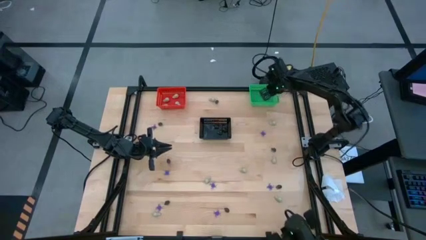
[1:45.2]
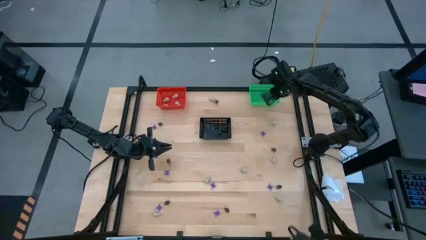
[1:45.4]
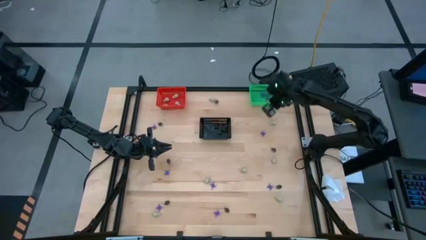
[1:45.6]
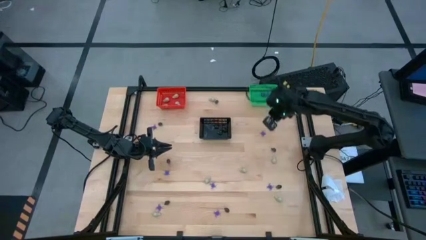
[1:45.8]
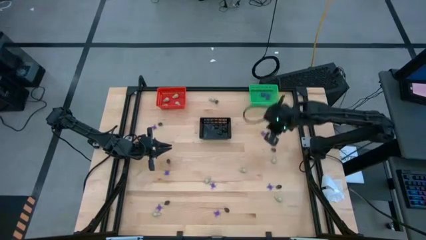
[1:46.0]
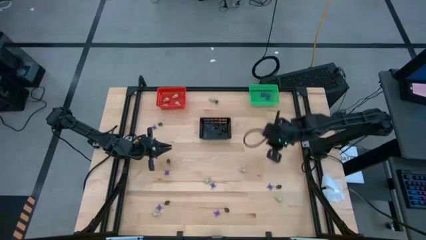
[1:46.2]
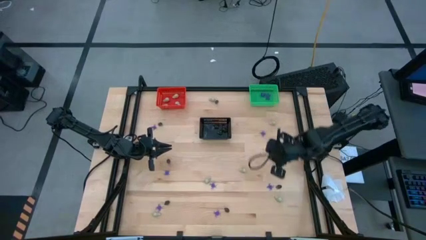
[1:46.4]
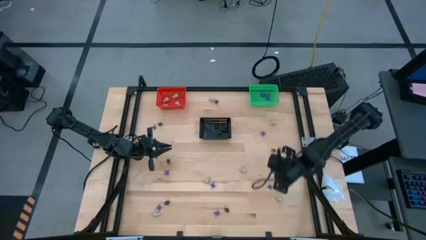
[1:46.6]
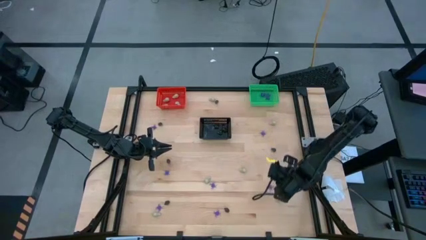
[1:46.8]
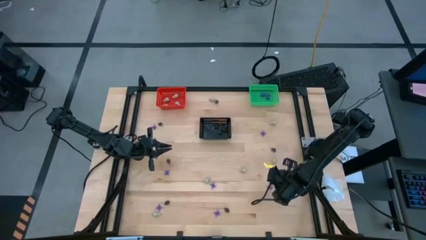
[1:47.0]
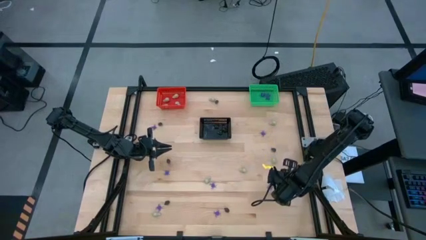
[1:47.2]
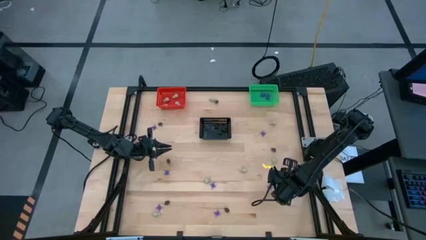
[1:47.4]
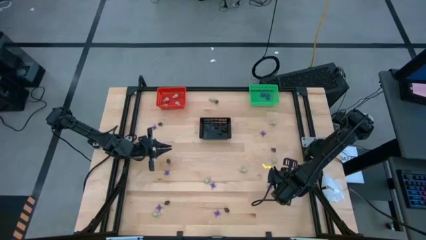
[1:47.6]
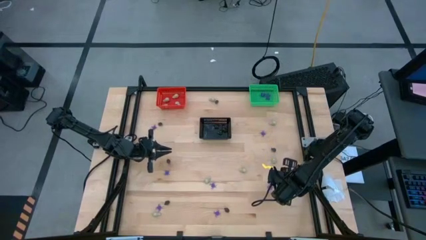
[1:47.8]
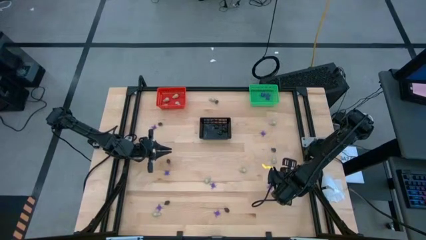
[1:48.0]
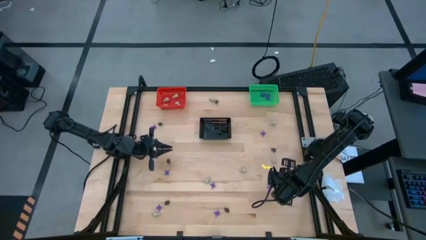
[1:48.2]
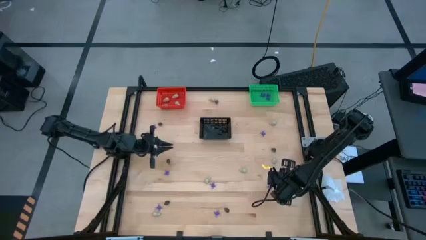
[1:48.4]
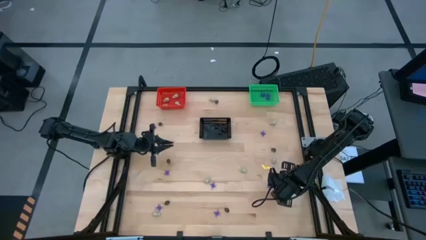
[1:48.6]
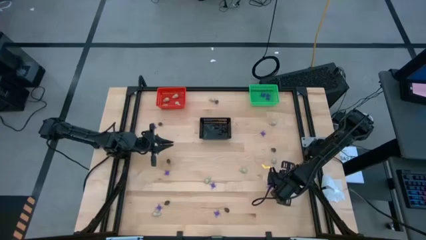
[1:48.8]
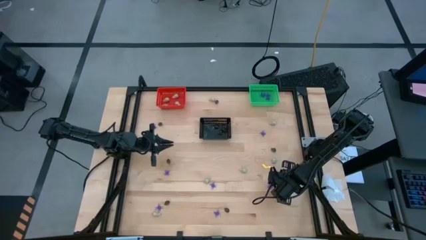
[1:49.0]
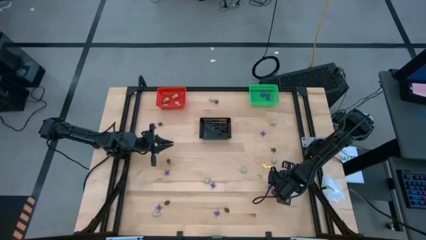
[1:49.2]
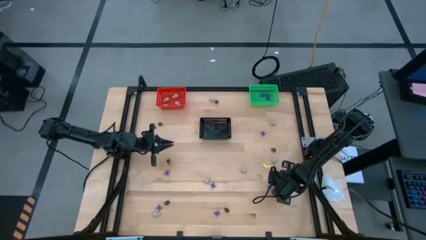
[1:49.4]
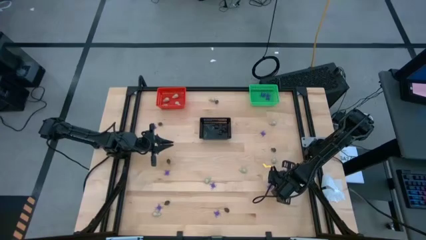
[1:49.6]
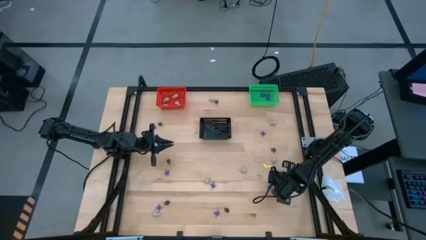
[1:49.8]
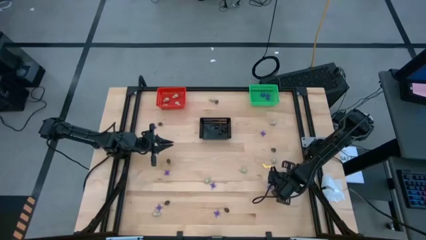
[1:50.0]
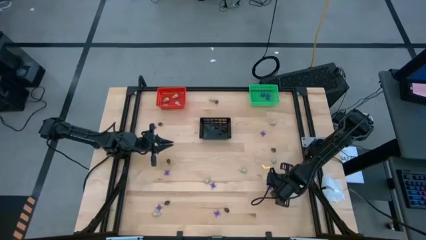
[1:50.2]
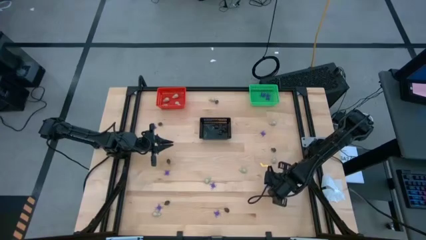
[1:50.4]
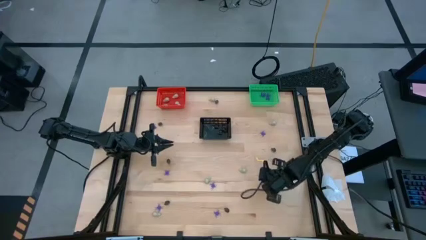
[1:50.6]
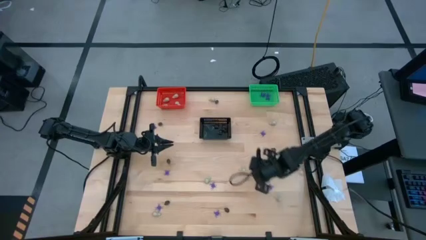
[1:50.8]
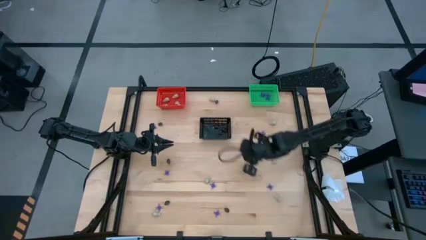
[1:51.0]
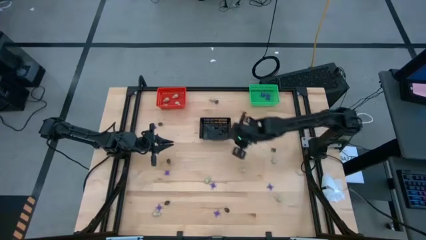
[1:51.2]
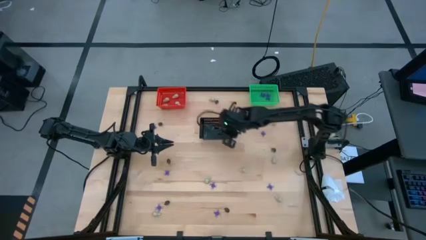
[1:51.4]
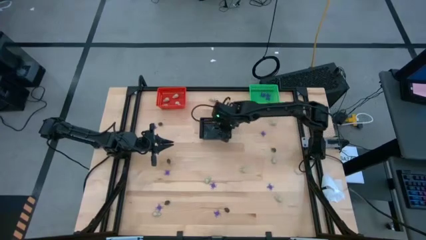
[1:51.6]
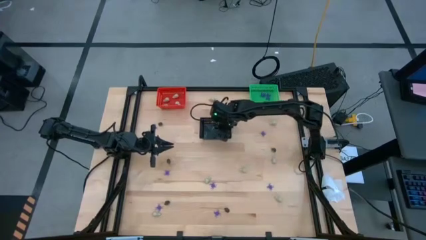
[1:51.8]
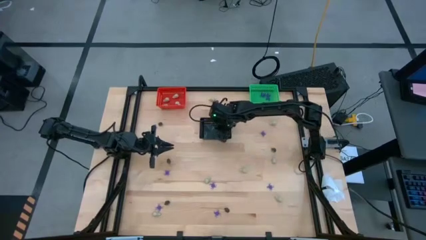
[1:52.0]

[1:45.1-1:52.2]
Task: Sort Halloween decoration
Put the black skull toy into the black bin

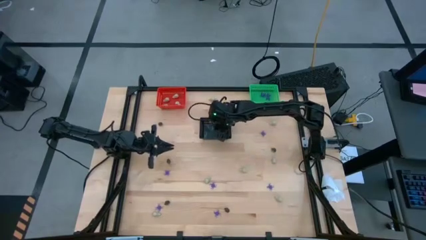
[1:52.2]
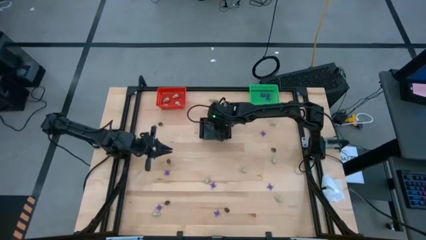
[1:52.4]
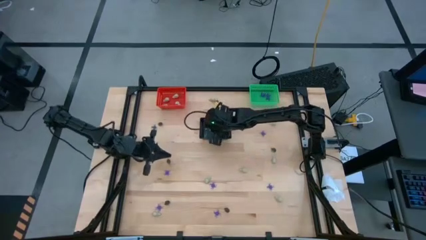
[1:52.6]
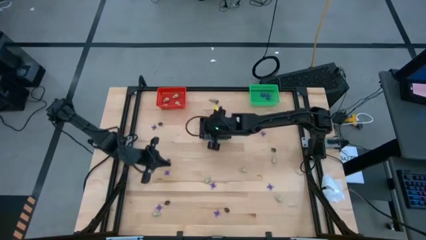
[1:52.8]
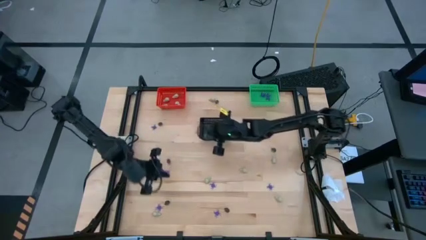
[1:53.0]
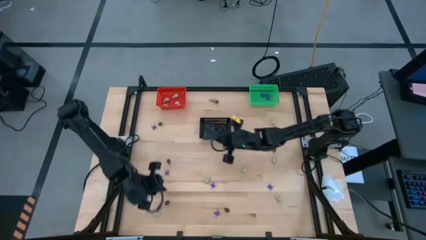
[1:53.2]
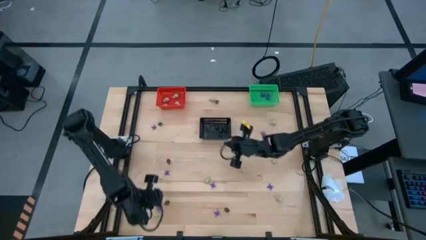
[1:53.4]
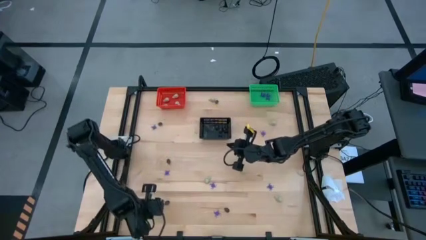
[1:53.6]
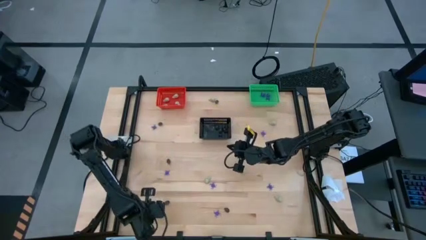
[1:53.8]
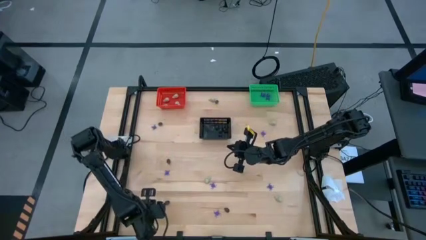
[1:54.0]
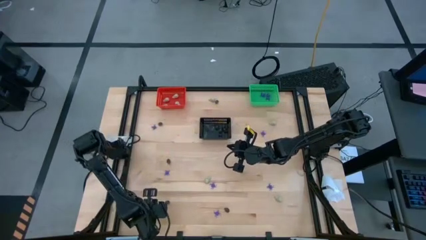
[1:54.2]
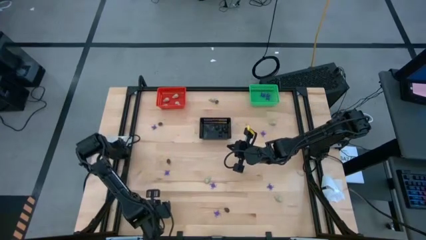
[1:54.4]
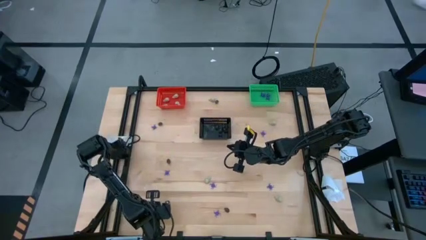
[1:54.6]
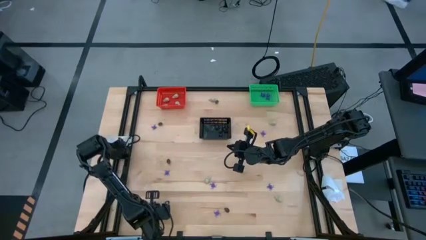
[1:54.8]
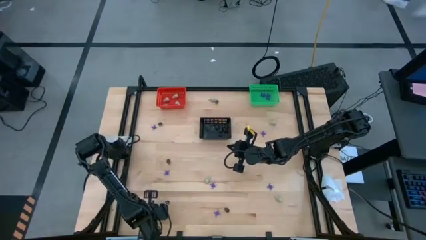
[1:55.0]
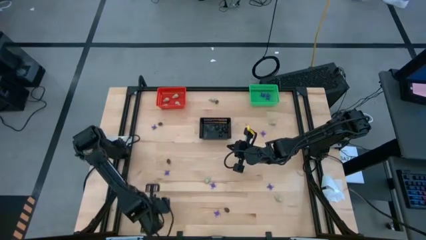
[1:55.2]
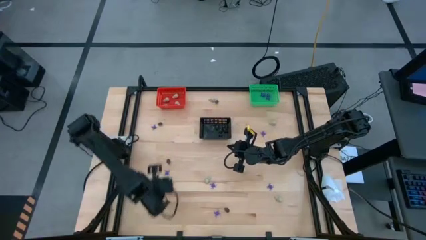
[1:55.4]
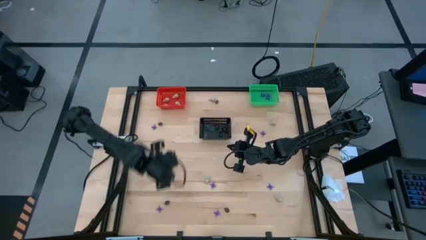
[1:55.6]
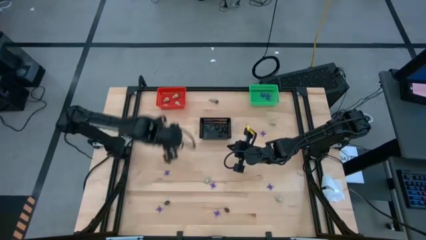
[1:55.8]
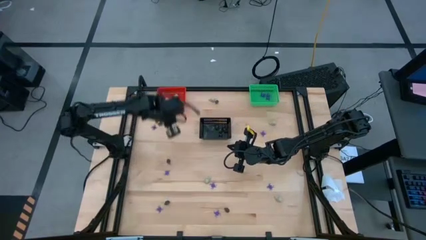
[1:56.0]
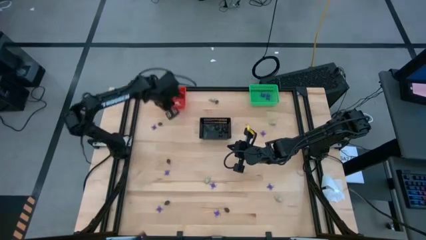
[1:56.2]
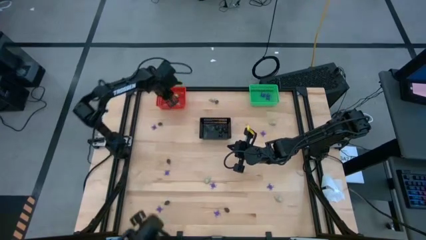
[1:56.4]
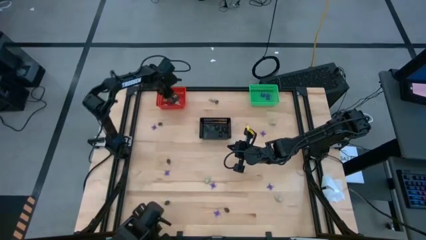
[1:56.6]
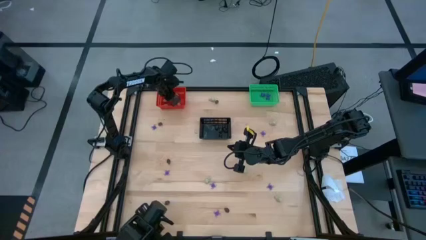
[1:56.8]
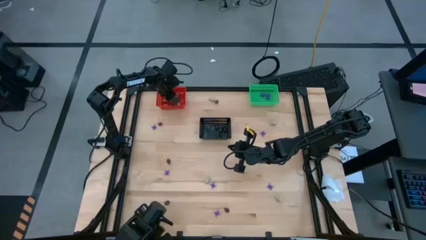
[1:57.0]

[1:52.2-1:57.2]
Put the white skull toy into the orange bin

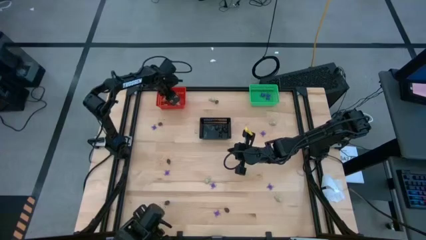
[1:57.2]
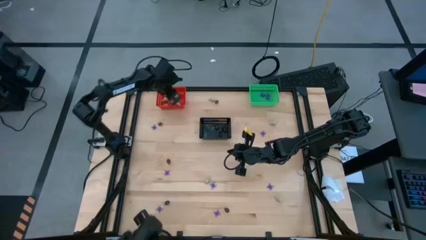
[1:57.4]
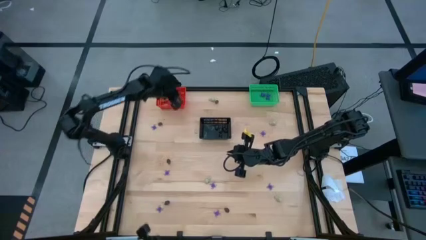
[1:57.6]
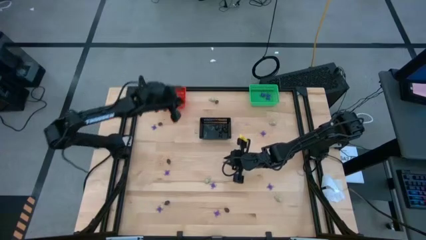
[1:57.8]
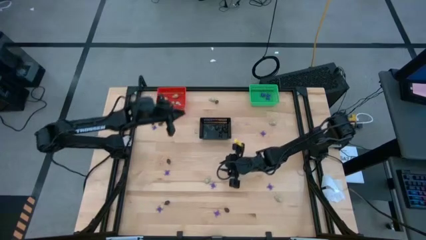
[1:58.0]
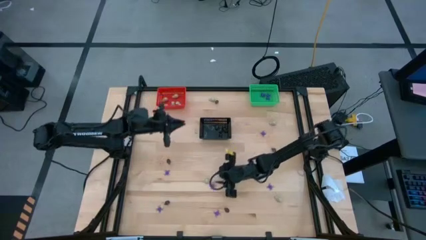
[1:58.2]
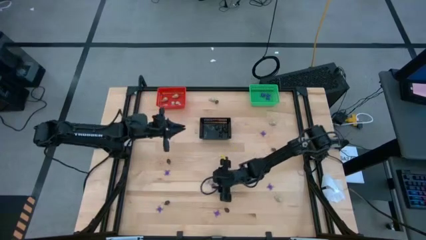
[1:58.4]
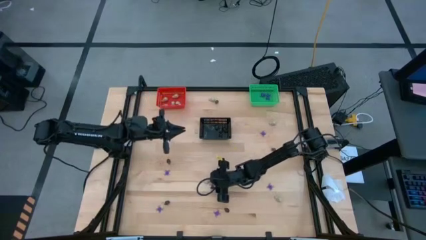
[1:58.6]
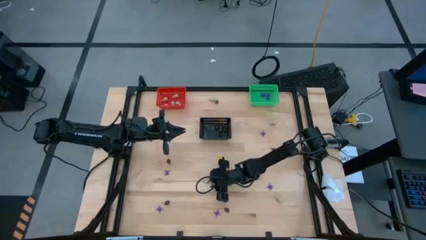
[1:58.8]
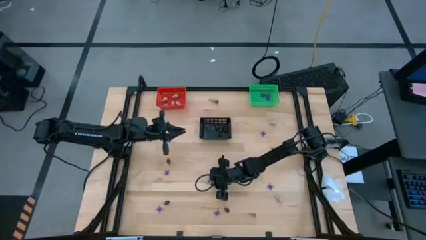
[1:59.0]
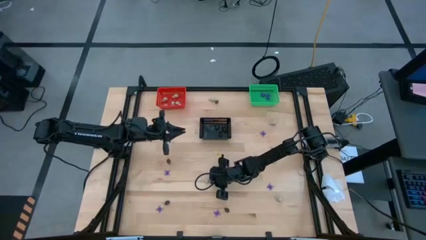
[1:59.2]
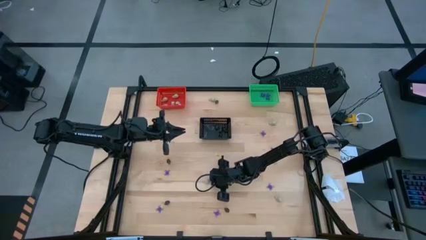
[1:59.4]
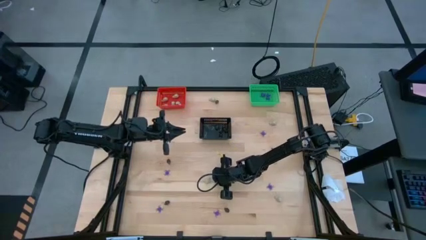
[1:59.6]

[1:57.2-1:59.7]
Put the violet spider toy into the green bin
